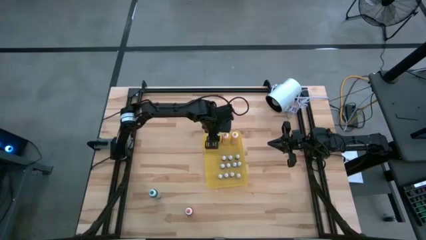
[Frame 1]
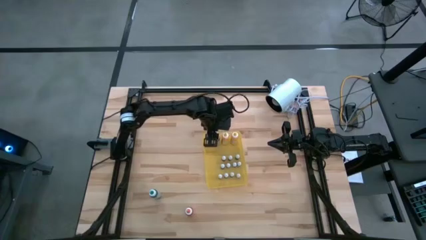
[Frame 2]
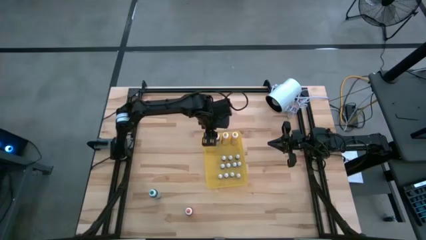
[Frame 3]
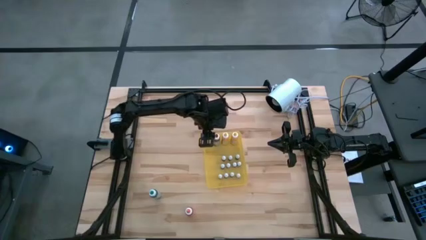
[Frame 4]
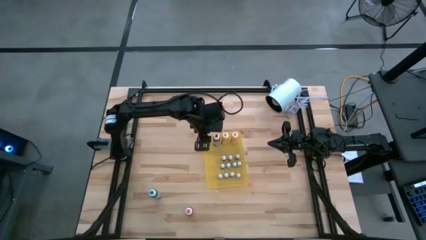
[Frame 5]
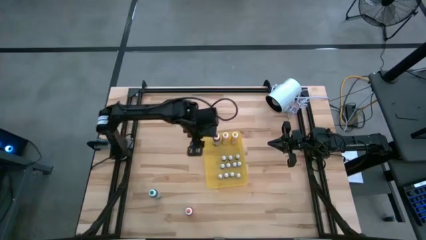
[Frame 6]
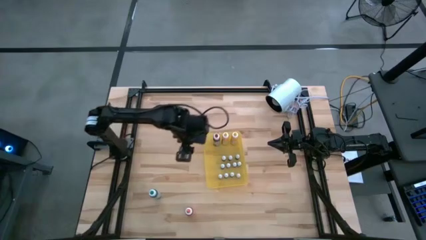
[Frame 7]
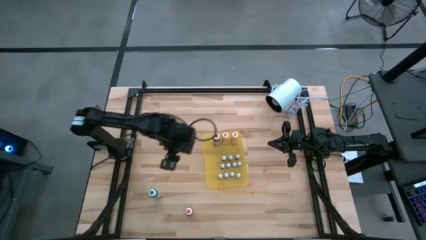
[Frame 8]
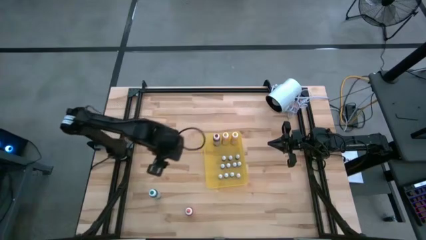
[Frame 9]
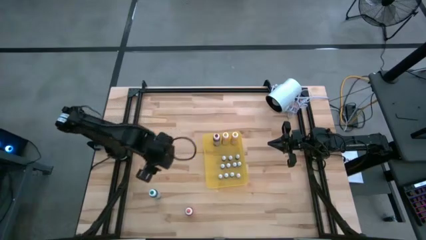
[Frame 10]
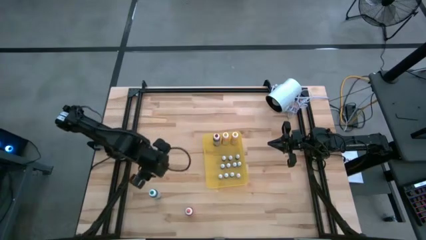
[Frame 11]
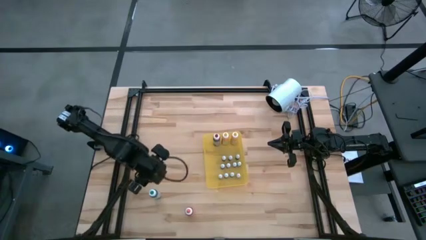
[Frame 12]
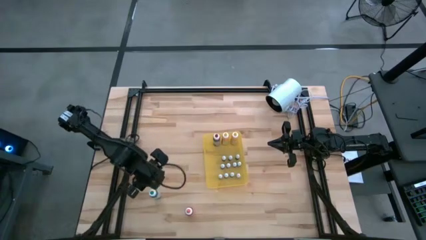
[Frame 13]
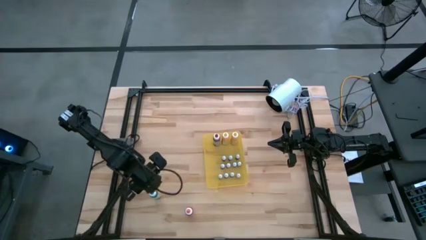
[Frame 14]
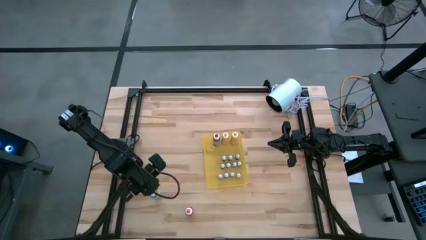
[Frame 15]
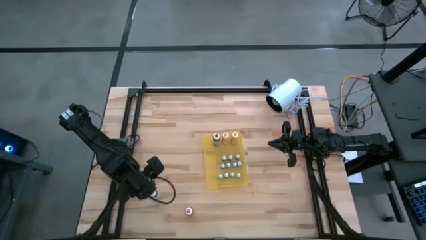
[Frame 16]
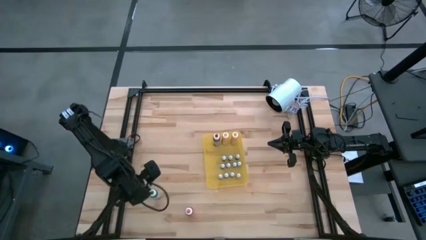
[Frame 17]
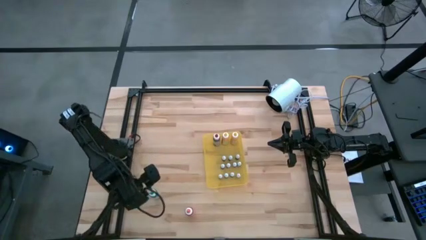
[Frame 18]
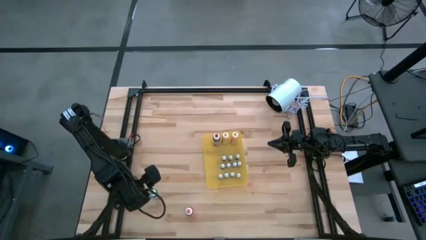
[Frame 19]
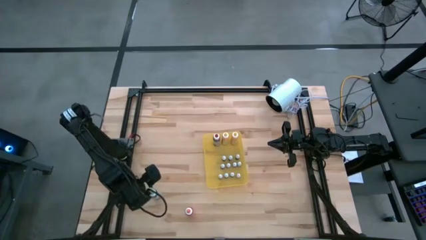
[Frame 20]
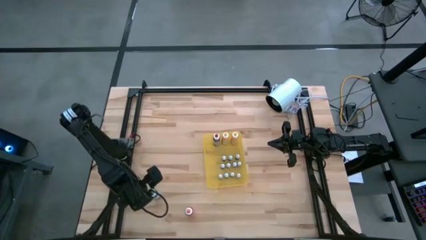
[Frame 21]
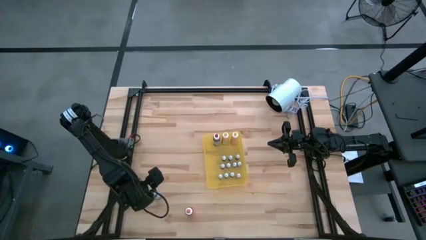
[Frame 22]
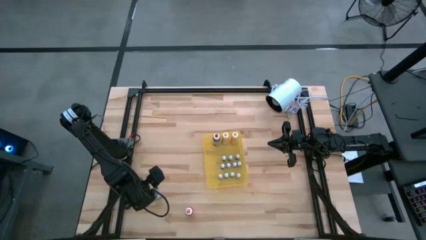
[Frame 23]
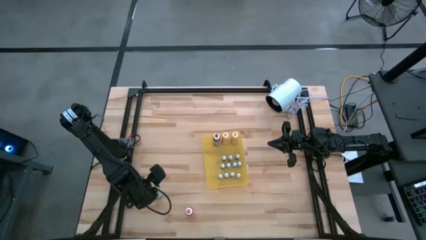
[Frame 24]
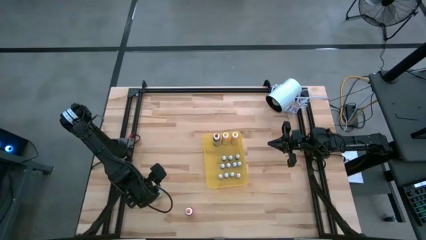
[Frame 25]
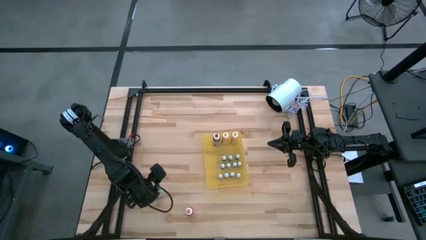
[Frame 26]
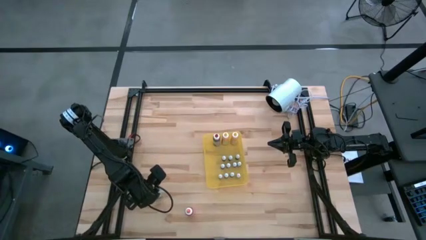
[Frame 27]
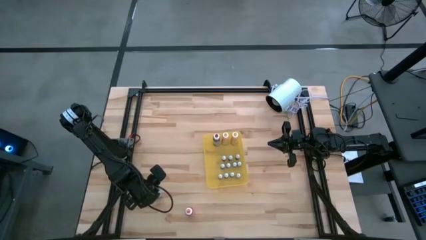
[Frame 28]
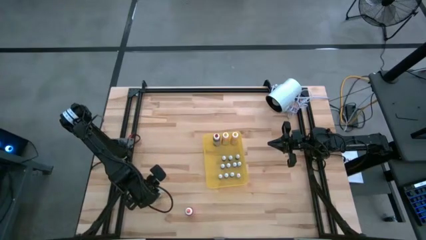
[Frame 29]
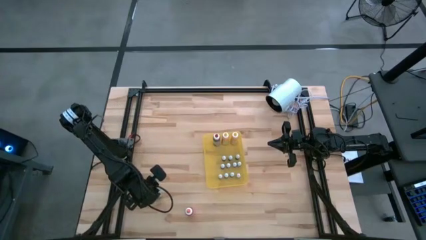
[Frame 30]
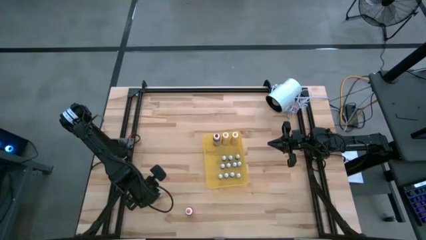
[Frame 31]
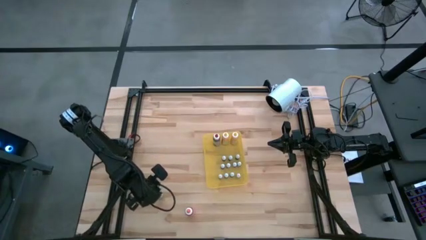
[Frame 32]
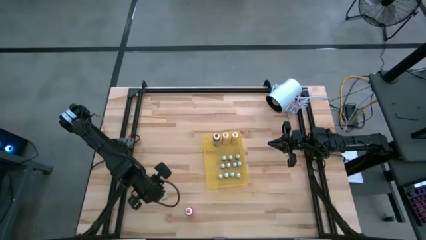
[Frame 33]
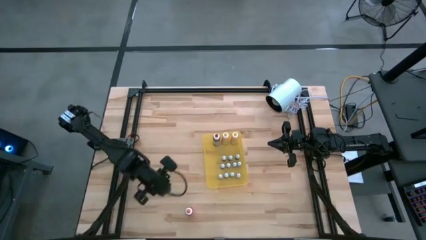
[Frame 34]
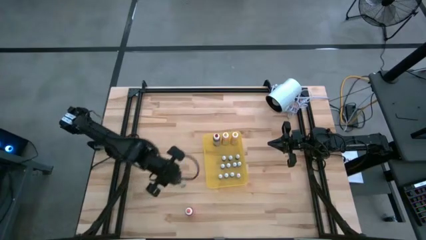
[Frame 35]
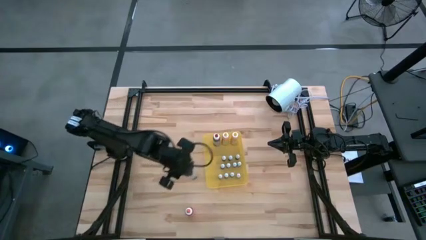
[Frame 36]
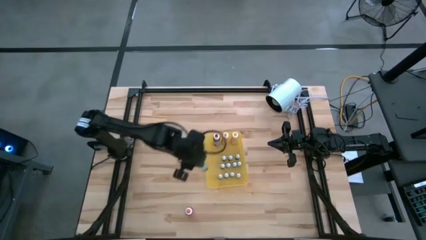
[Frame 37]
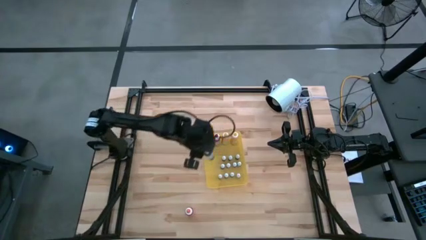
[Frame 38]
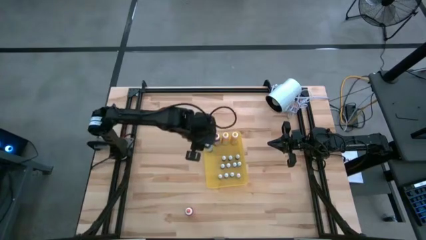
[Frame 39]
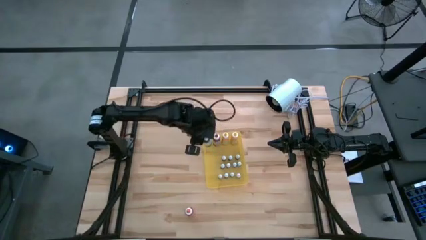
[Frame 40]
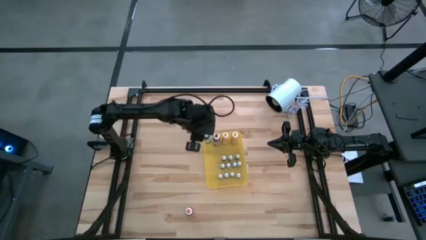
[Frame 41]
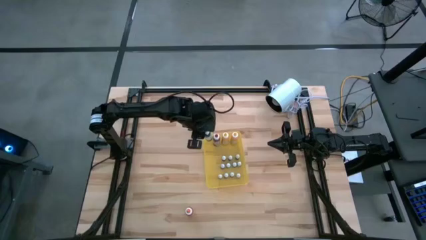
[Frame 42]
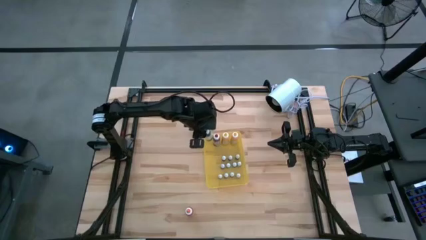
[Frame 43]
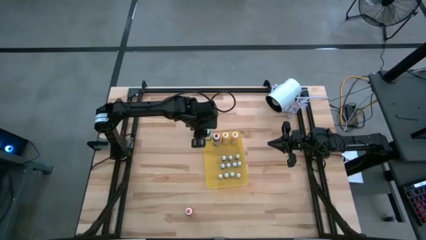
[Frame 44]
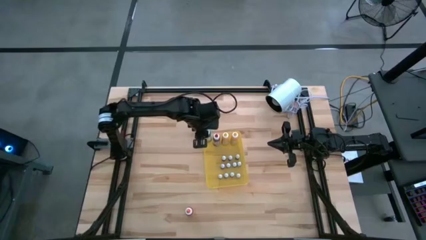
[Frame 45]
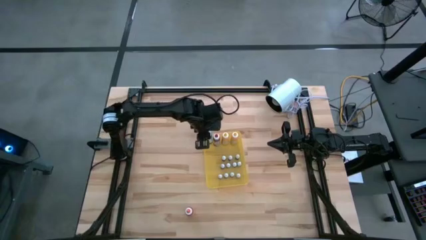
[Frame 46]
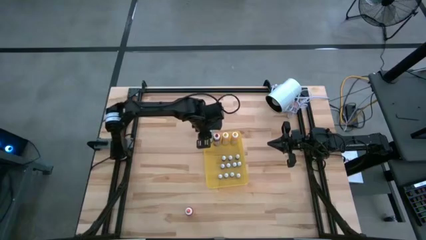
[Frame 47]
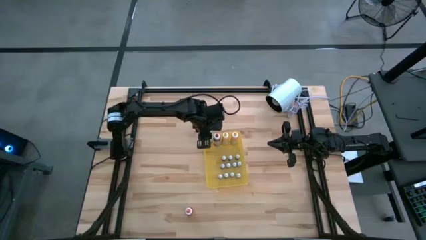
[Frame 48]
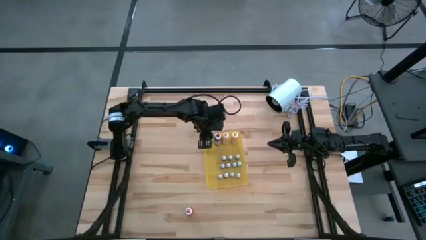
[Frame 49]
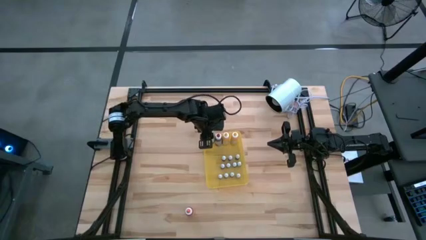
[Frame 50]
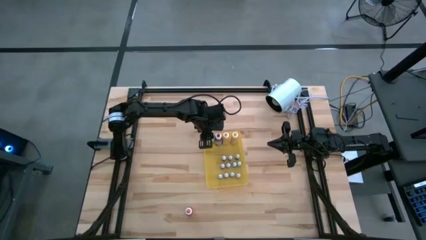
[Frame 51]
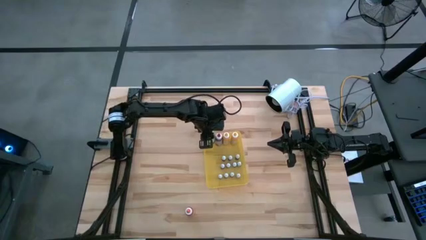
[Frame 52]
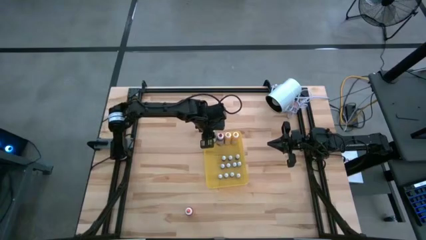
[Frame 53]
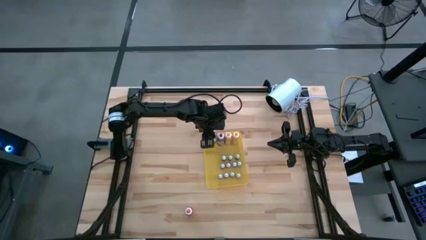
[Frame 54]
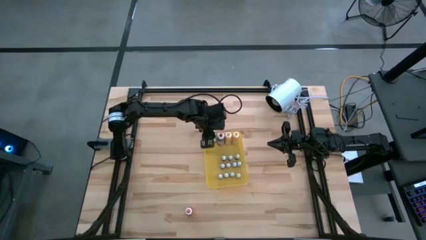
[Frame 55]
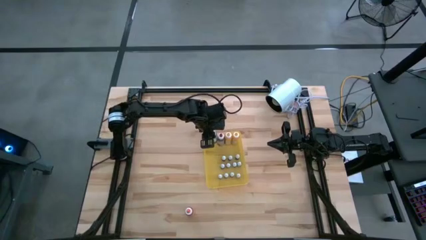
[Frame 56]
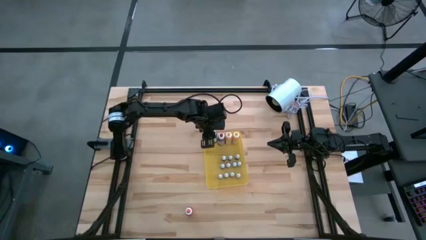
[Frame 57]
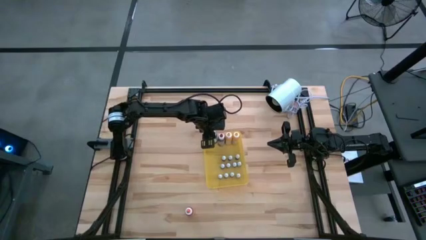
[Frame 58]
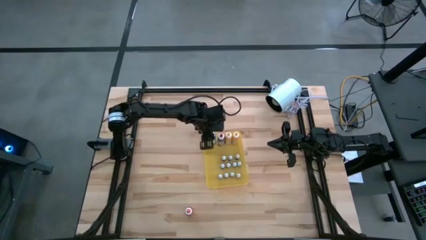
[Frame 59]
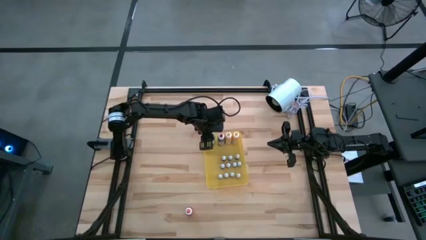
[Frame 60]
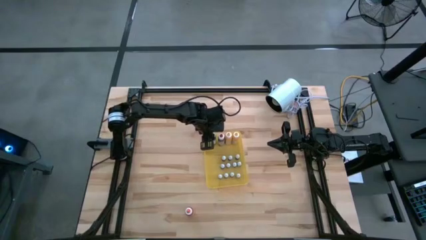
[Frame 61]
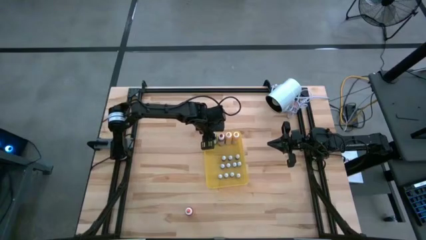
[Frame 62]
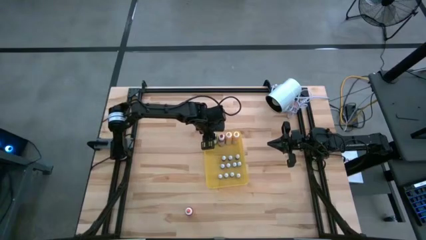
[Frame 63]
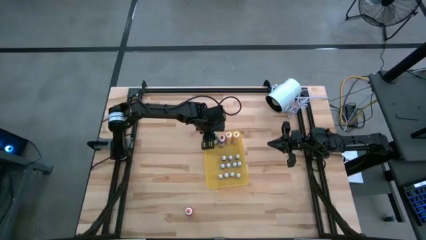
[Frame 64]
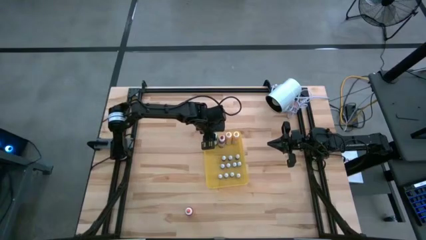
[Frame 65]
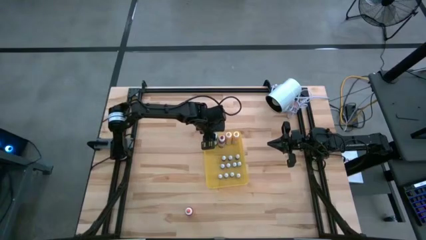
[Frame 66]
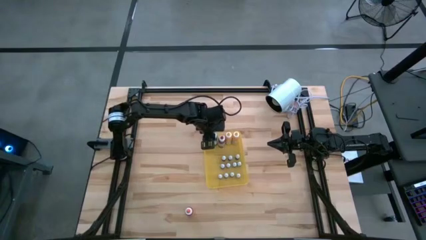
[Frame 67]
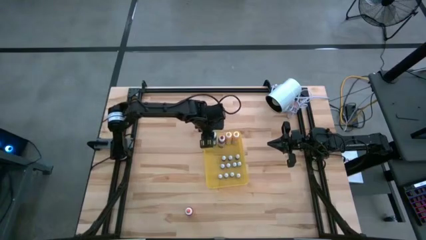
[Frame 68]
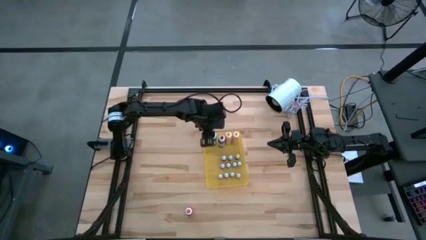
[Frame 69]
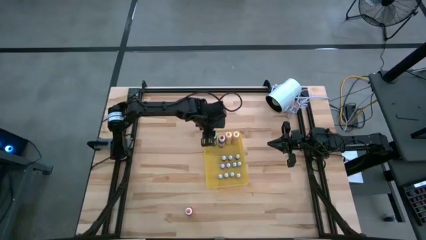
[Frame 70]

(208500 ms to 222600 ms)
Task: Pick & Place food coloring
Put the large green food coloring bottle into the yellow bin
